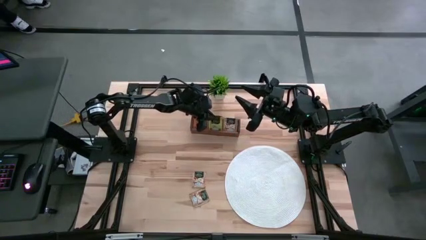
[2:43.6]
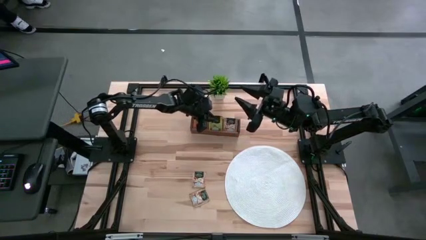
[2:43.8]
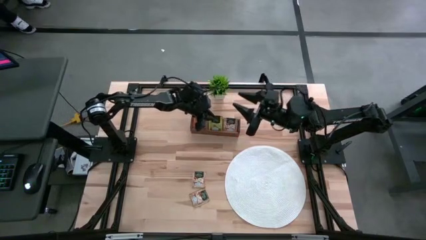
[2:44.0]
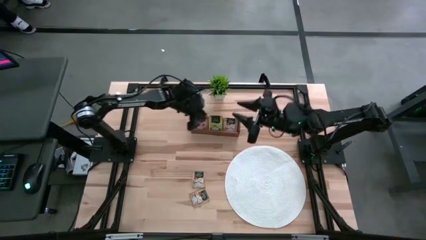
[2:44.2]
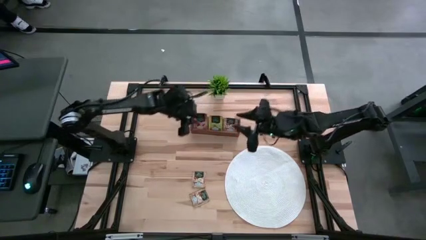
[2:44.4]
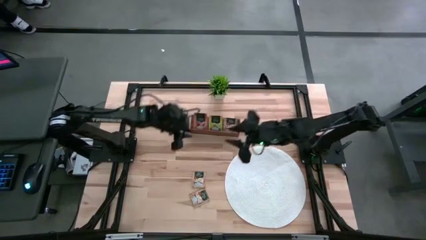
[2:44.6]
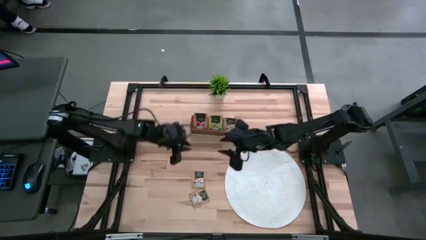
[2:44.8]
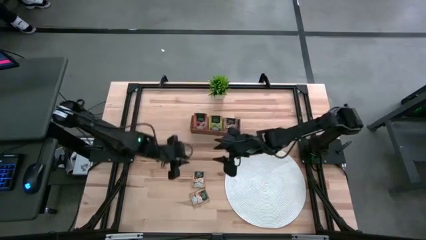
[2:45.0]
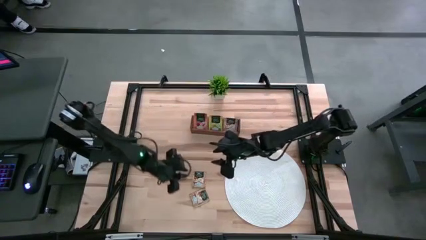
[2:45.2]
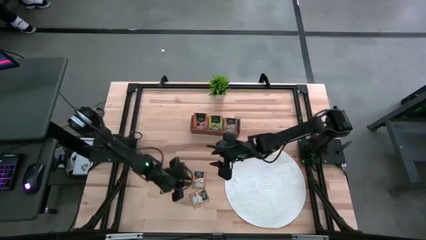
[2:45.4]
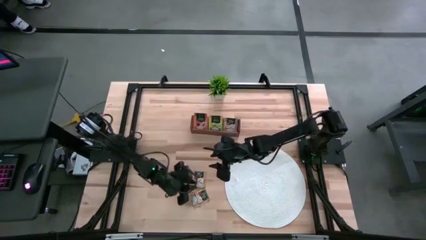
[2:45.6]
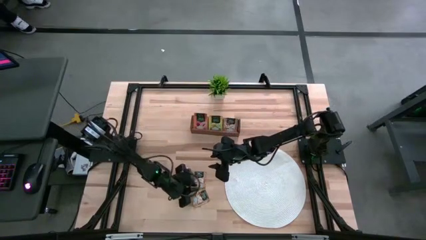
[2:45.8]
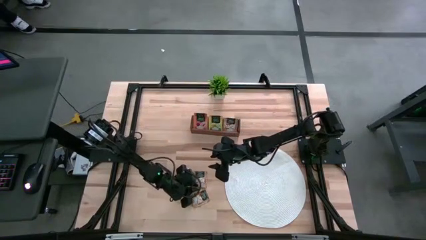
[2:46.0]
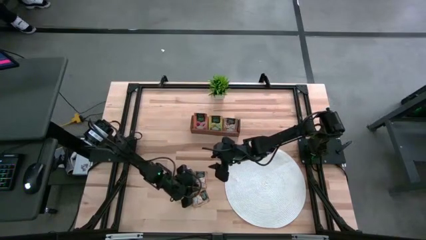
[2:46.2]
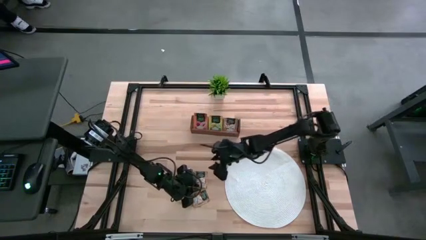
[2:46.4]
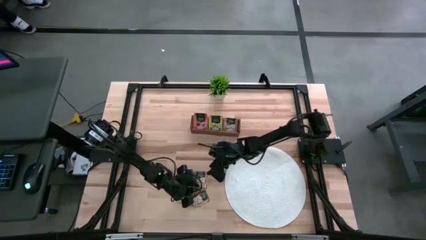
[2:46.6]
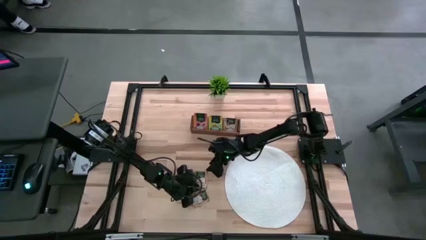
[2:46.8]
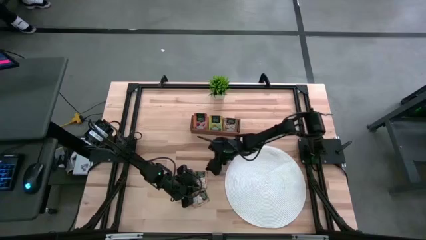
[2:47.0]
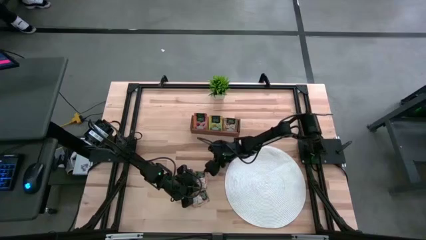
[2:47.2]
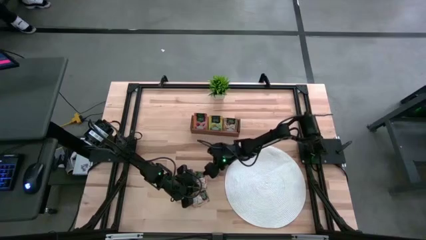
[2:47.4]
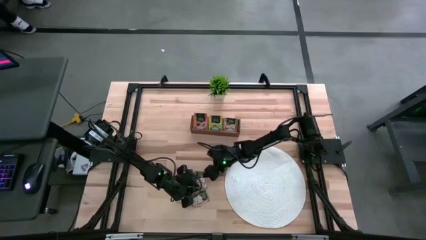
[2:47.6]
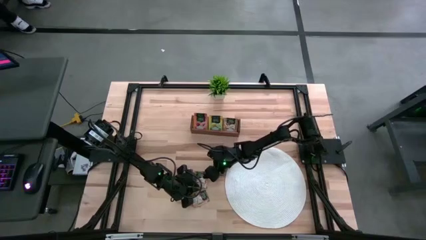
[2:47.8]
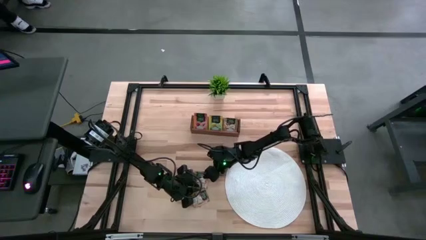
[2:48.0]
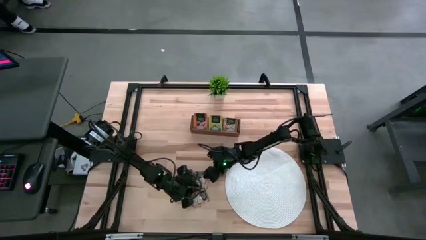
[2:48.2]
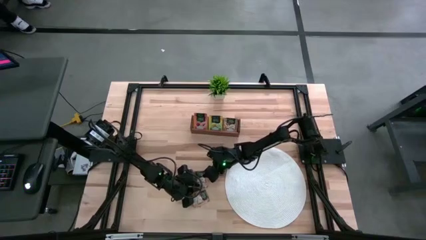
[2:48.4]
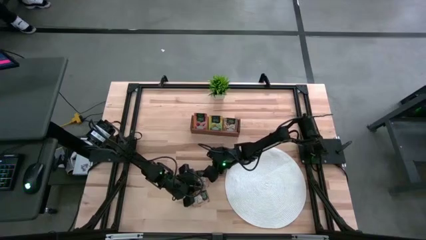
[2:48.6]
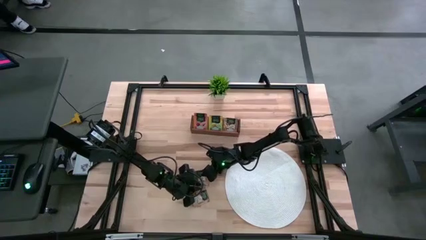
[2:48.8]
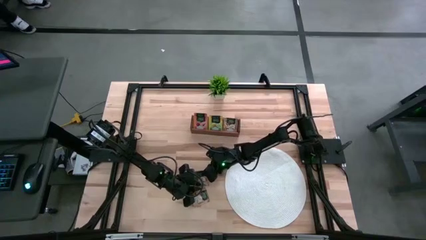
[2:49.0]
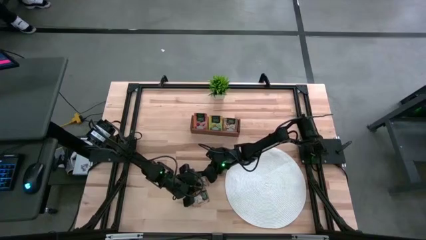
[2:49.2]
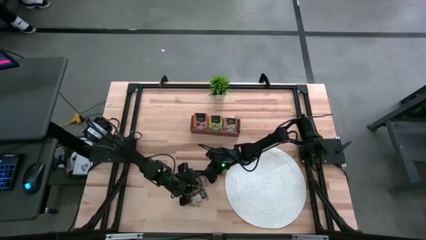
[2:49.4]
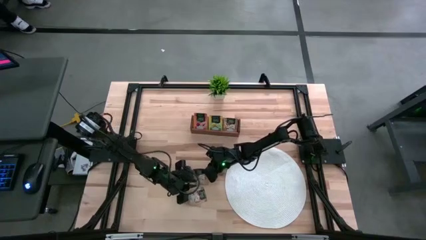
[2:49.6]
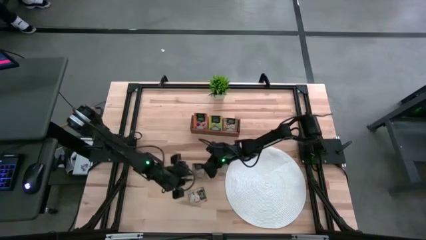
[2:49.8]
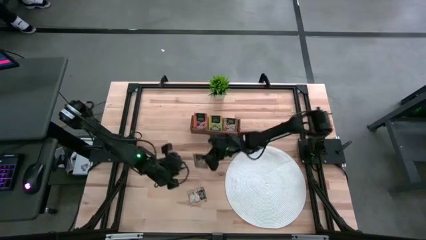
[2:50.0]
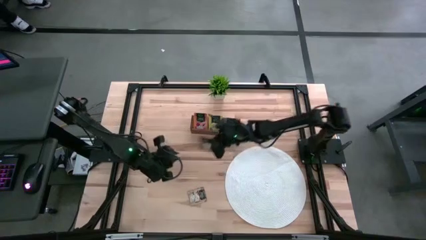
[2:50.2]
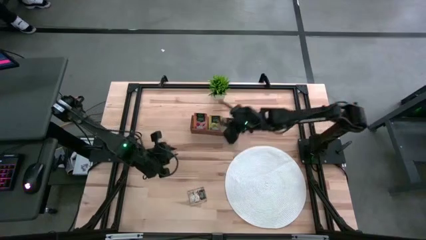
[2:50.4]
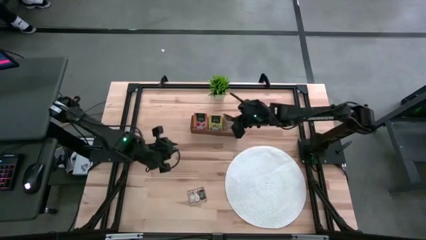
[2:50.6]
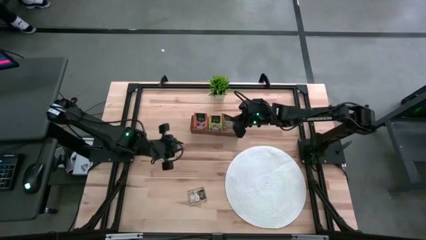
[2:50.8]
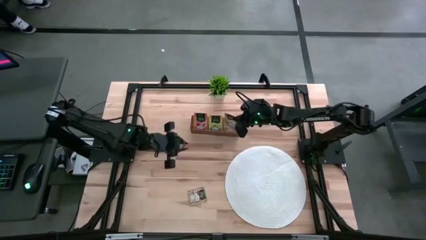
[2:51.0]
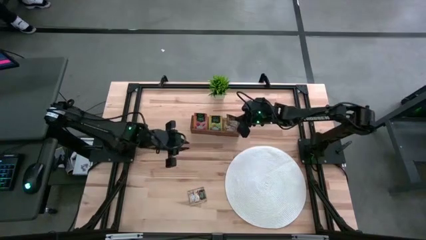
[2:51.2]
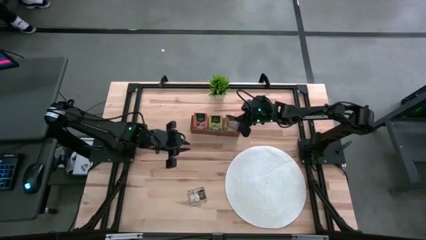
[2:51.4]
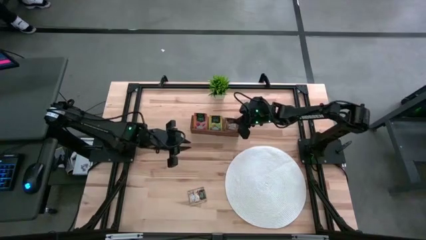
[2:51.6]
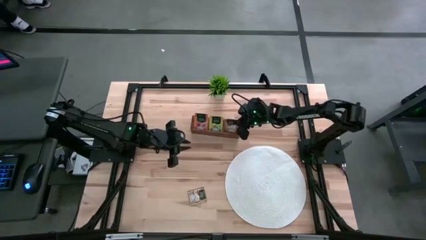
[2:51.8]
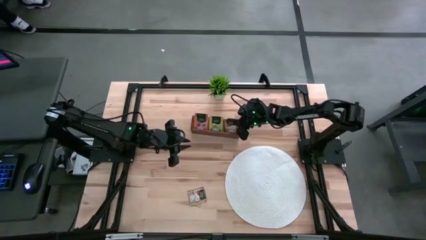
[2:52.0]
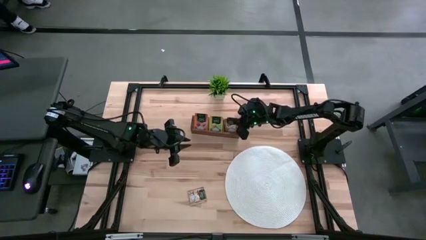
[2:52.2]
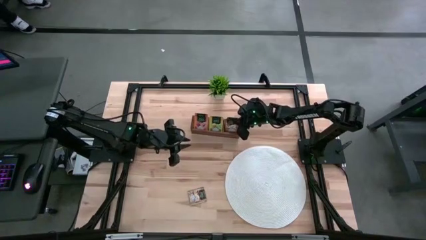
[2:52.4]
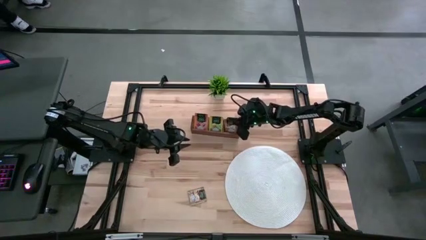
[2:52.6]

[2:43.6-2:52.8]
Task: Pick & Place Tea
Put the brown tea bag into the right section of the wooden organizer

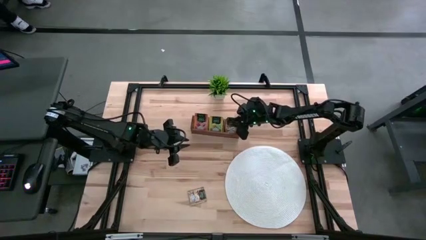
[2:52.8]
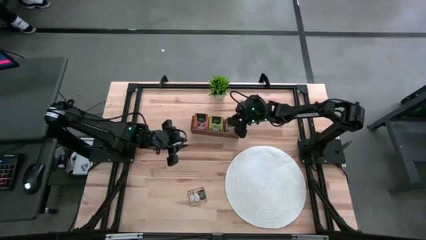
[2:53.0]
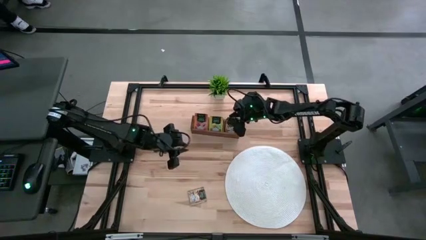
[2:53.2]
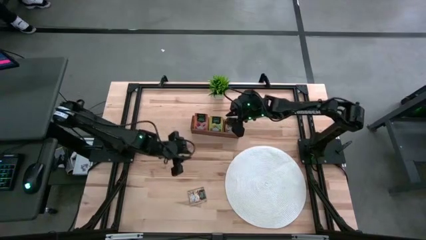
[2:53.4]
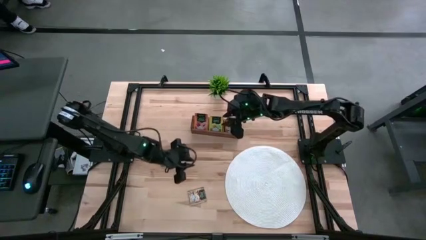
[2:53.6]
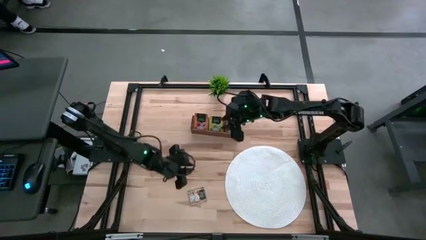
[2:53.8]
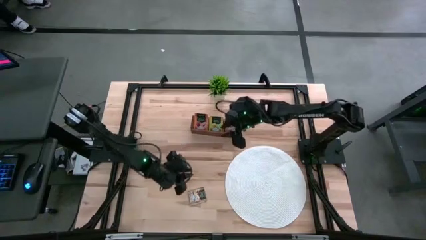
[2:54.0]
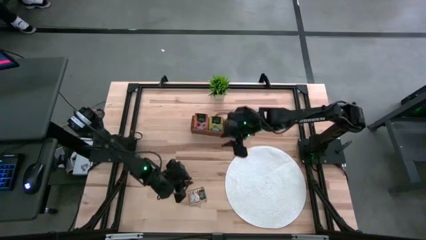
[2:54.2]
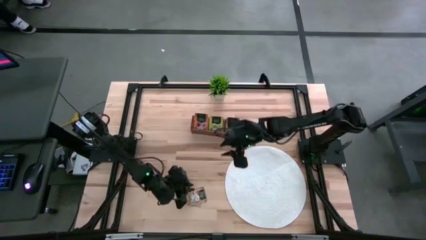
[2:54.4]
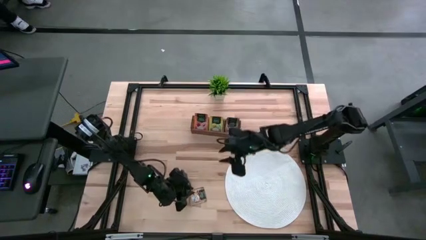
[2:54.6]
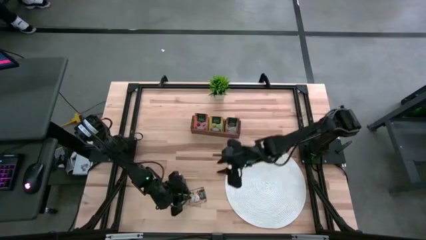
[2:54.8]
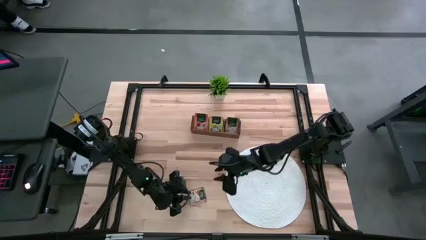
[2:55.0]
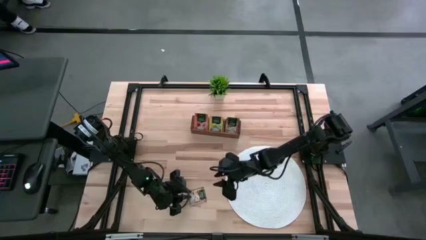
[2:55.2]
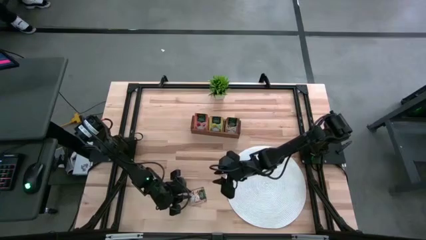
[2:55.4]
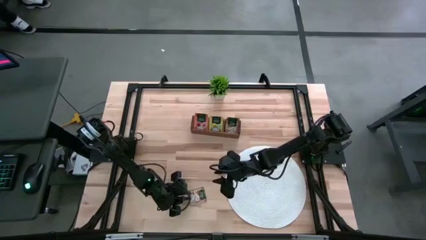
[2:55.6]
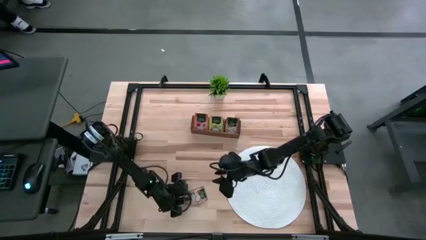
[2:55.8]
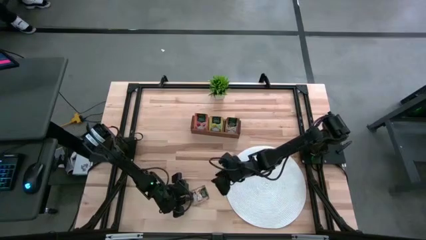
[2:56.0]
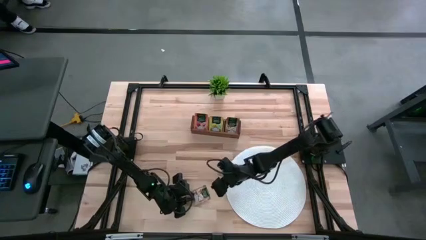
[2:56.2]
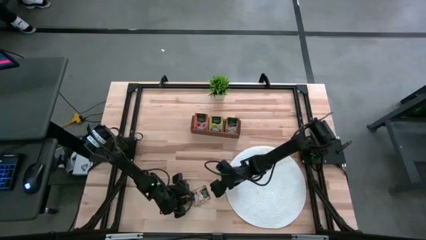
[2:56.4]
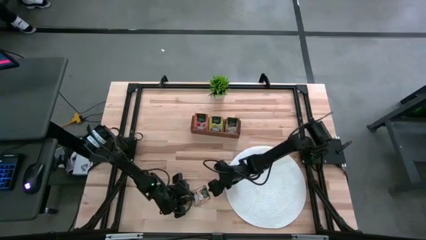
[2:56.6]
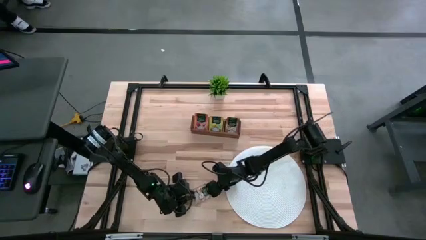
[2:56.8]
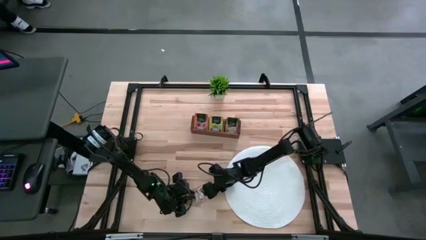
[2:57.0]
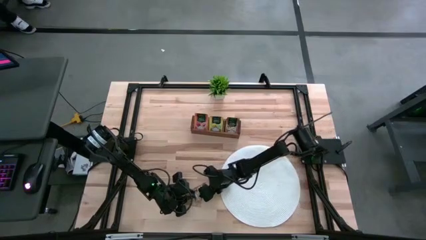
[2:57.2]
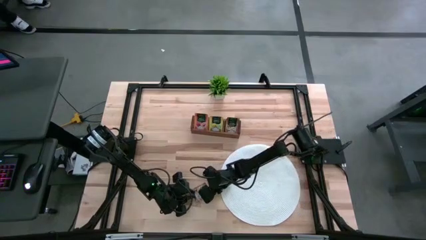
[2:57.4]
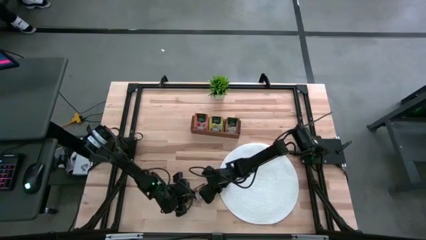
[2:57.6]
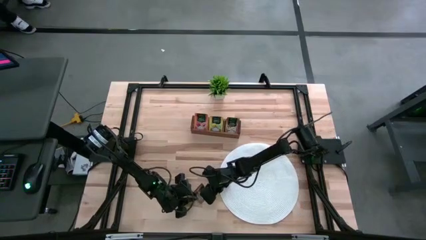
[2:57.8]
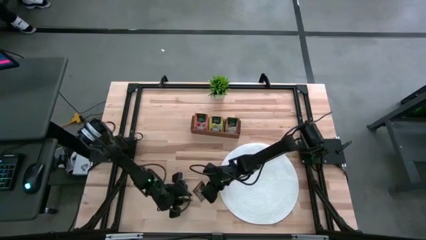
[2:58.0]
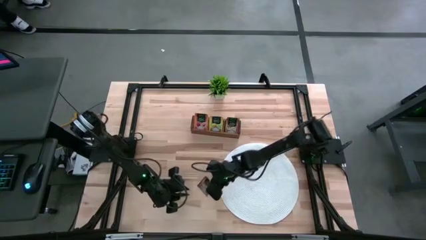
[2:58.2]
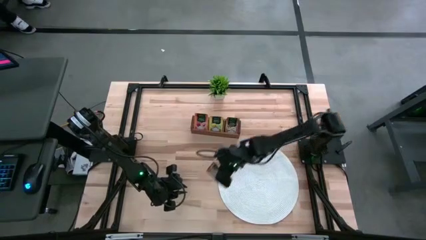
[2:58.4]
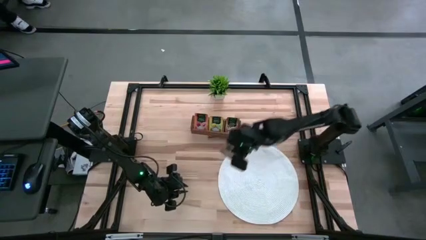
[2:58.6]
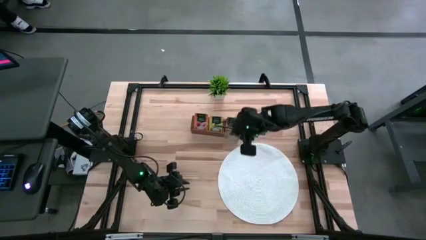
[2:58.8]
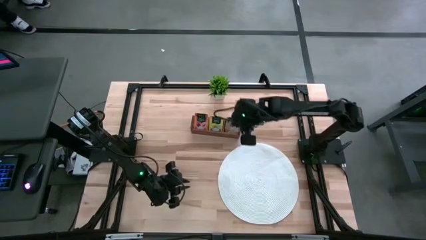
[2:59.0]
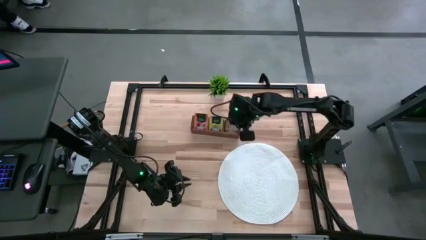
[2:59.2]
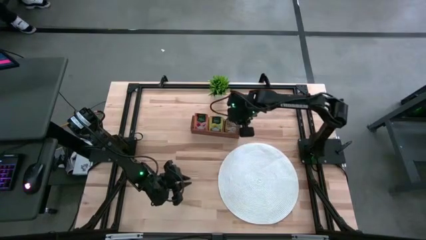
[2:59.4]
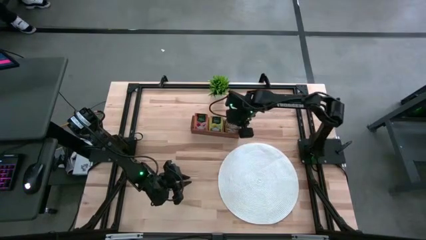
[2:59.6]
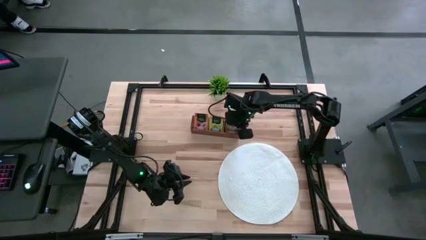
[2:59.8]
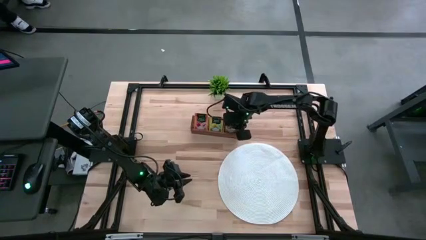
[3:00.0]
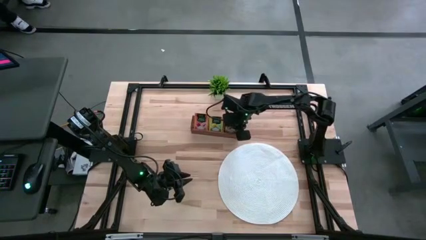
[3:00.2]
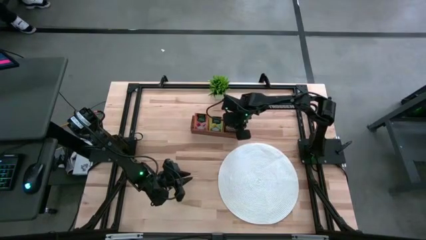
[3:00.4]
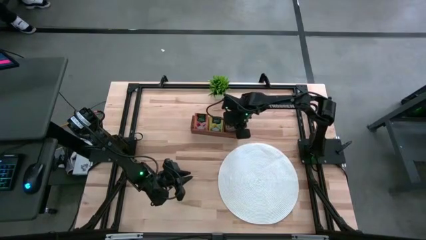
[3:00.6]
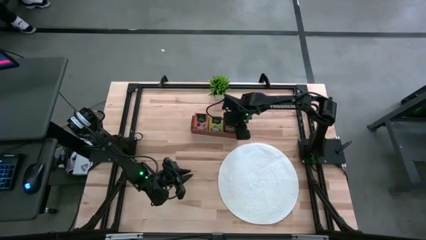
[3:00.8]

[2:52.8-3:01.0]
Put the brown tea bag into the right section of the wooden organizer
